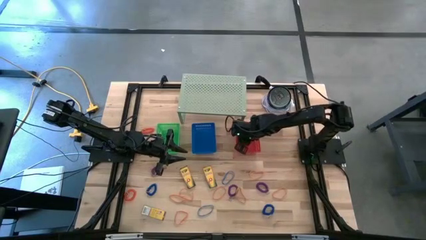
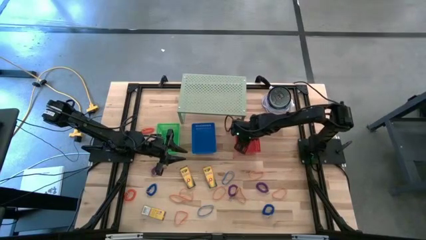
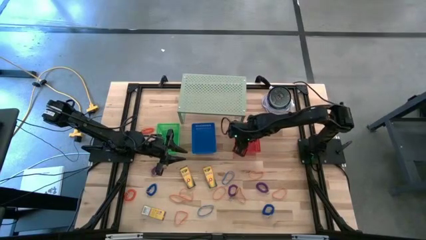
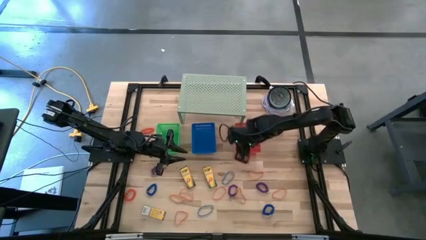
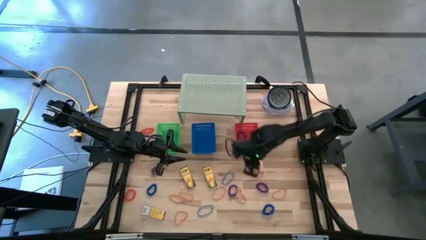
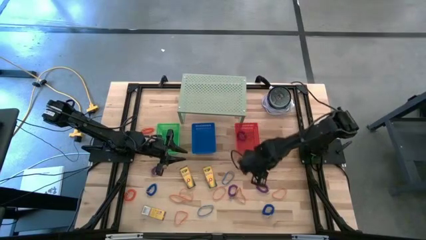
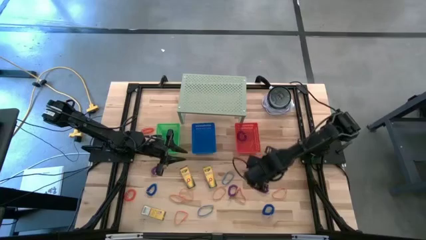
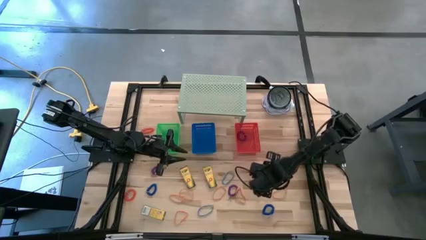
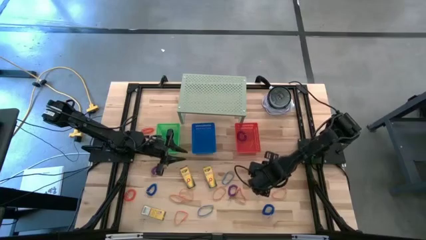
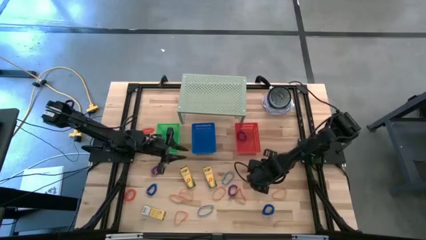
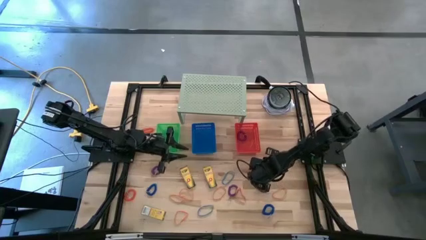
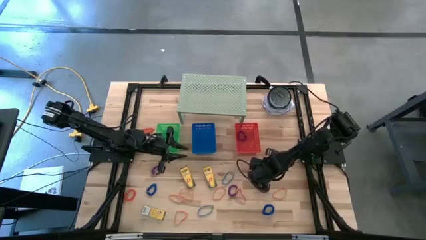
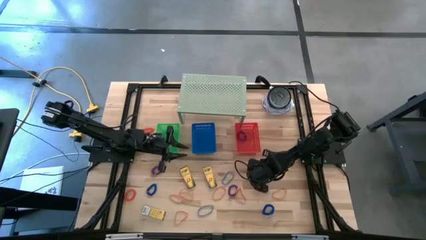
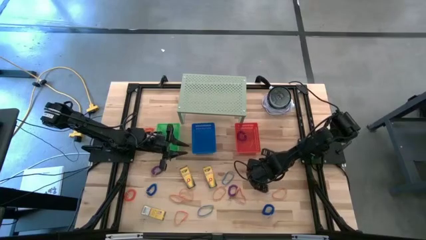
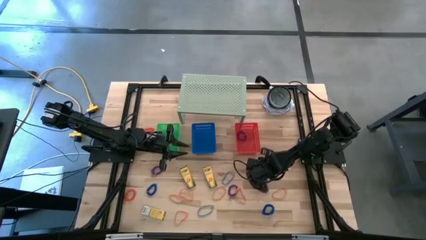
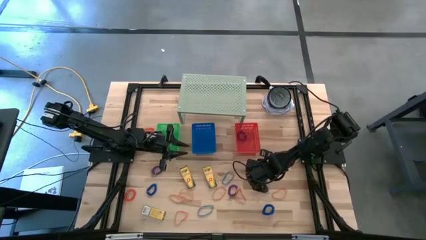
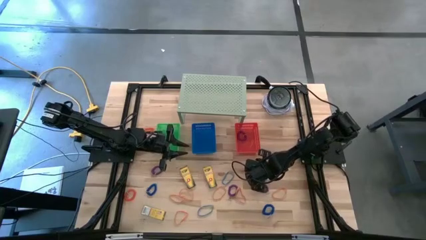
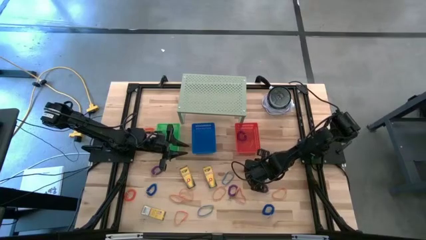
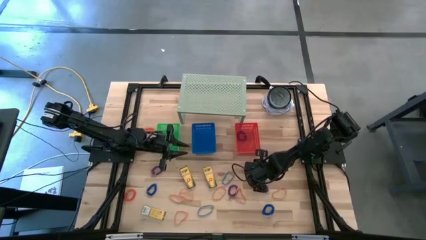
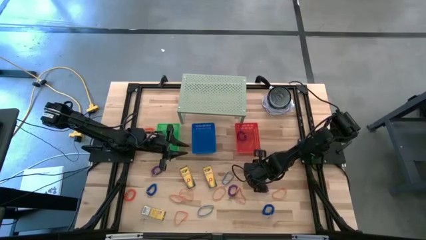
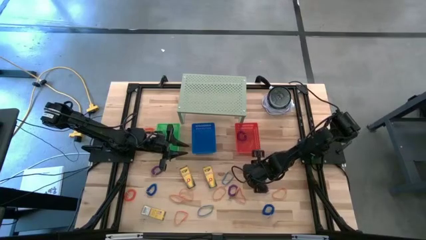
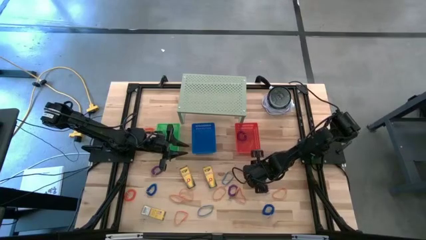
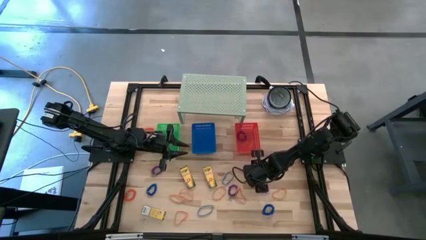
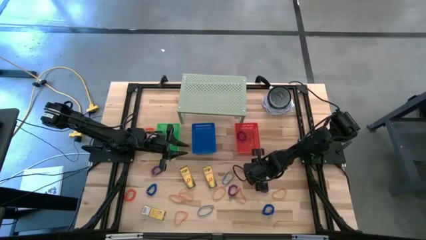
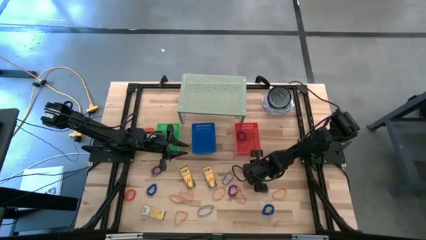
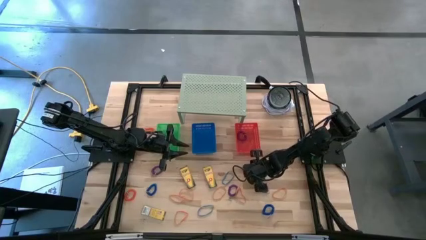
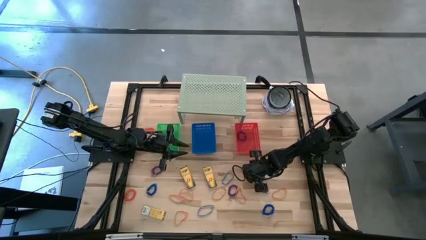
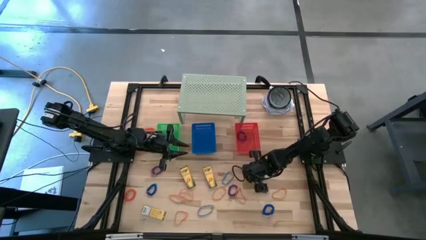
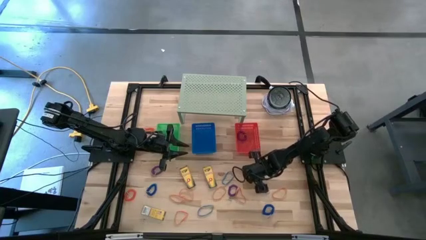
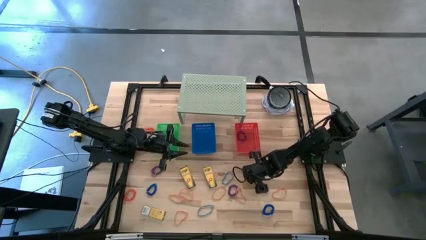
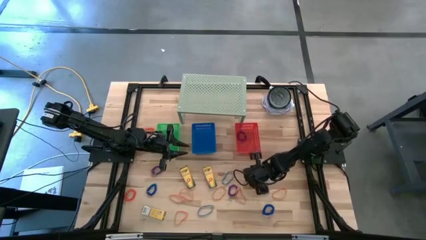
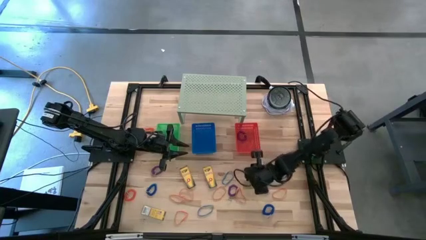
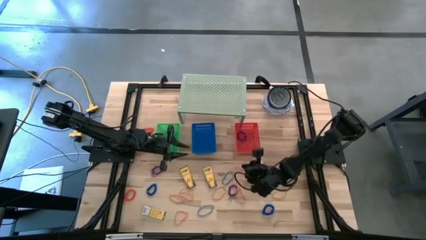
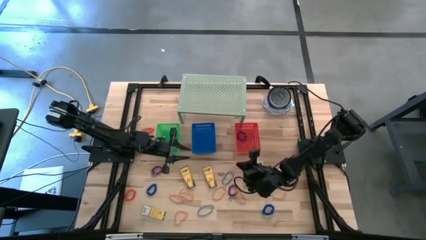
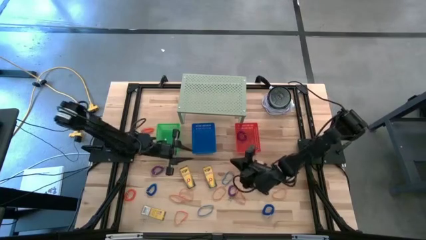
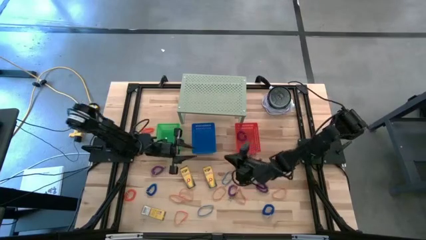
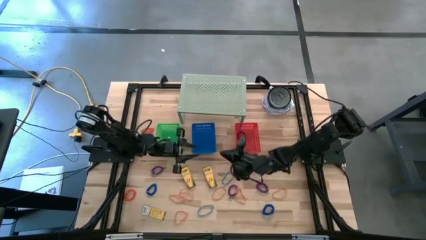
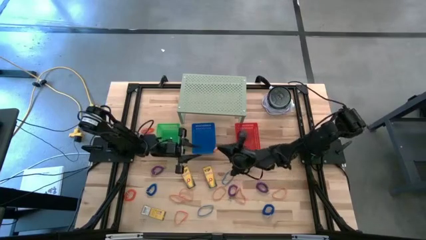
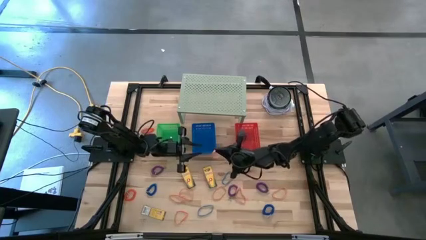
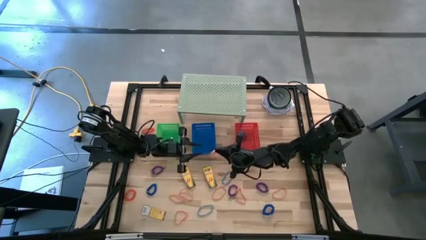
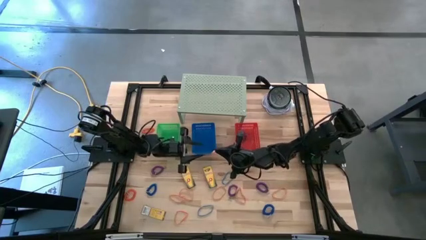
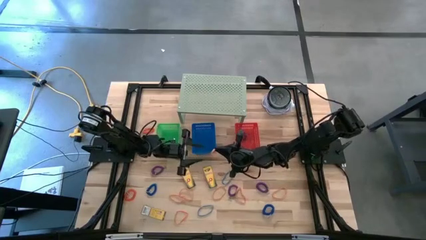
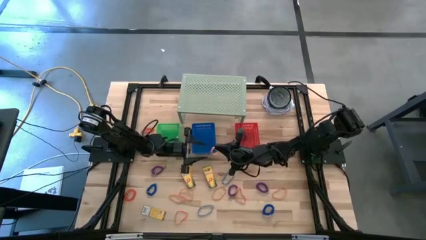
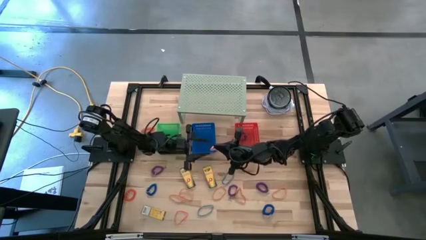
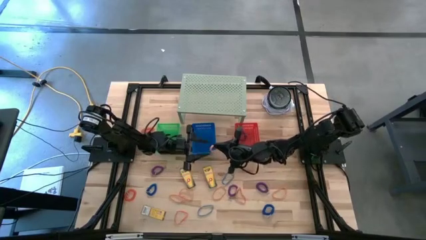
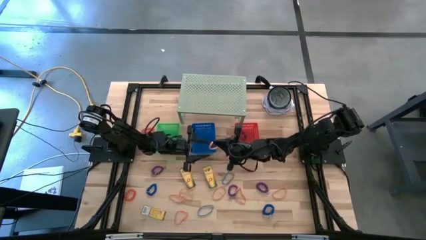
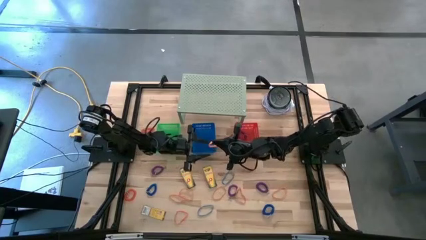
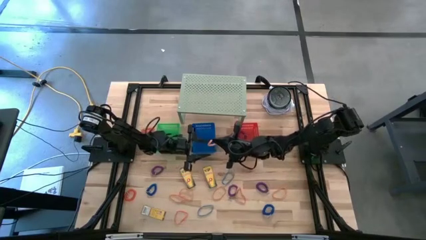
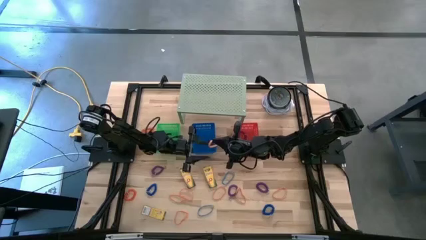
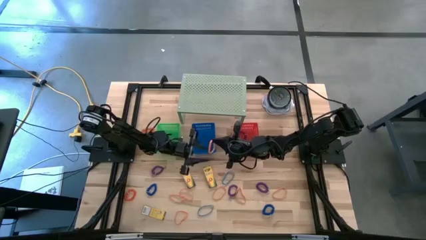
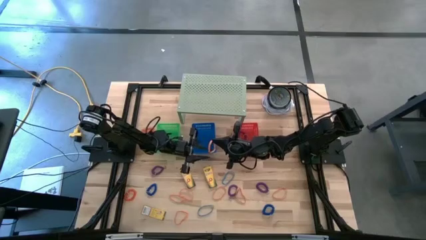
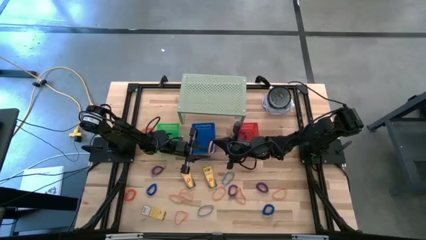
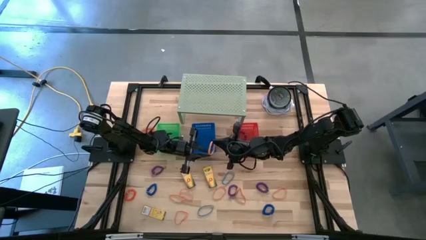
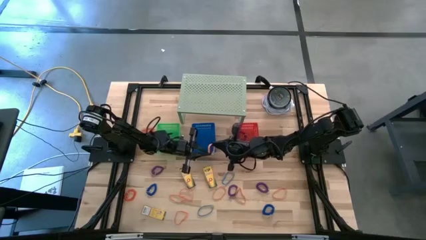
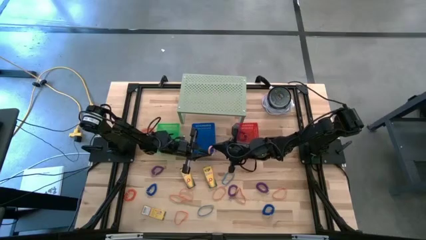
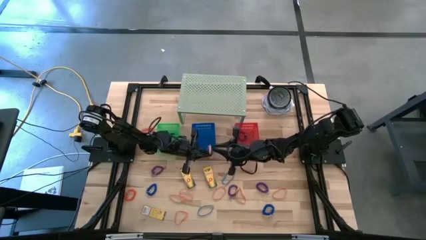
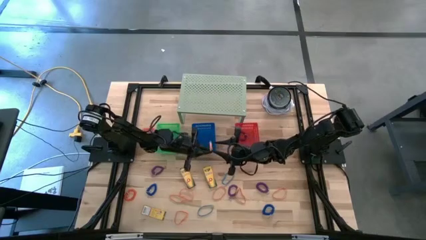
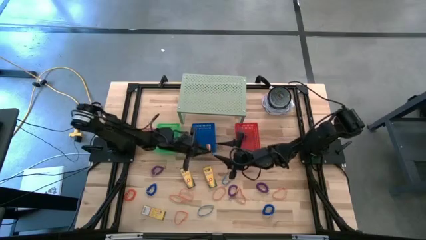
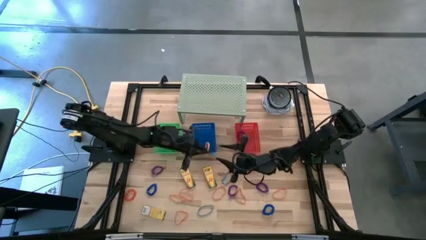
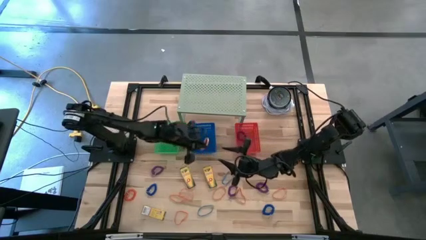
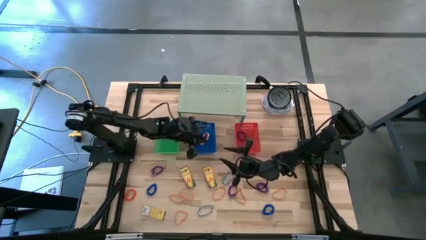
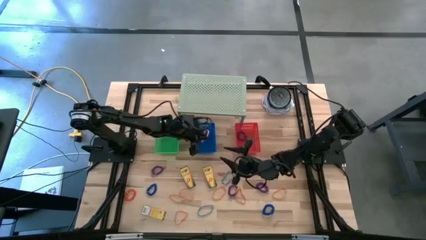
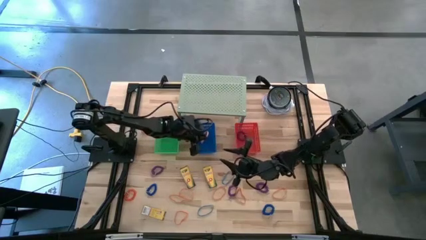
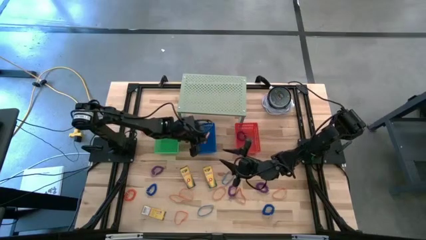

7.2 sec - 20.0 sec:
Task: Pick & Place Office Desk Supplies
Put the orange rubber band into the blue bin

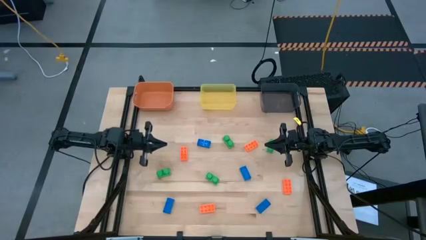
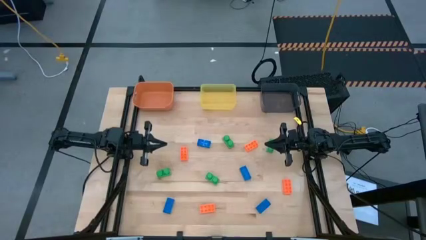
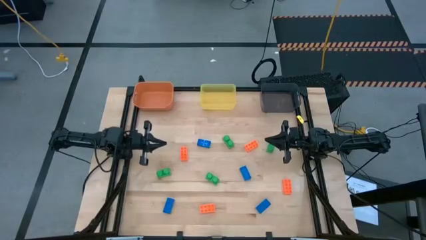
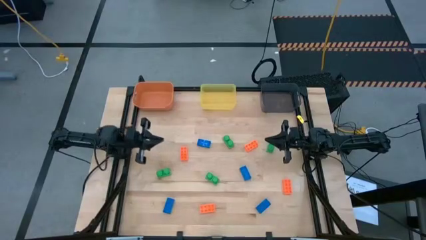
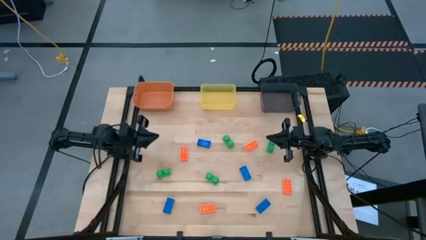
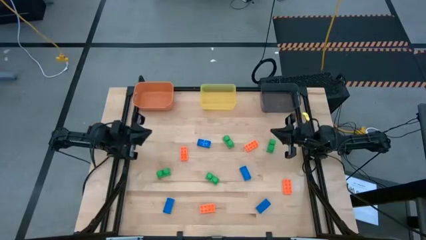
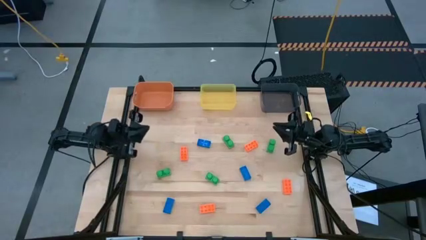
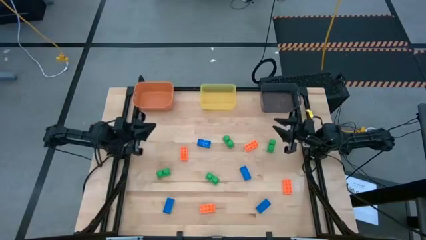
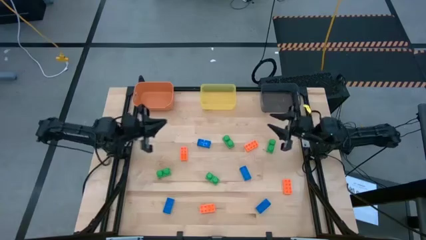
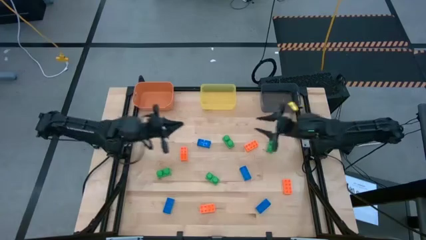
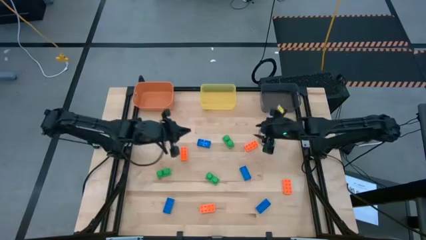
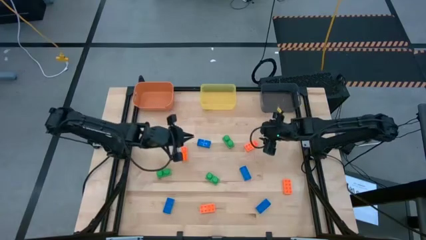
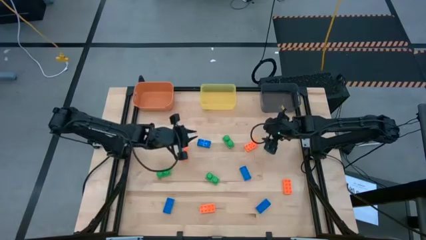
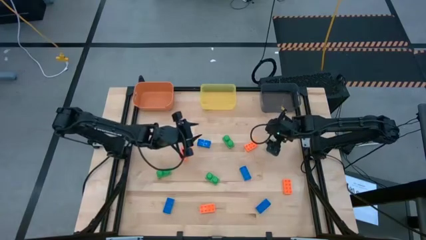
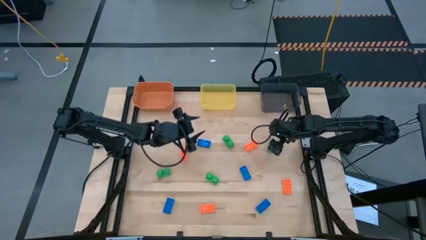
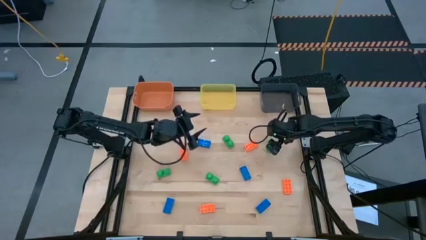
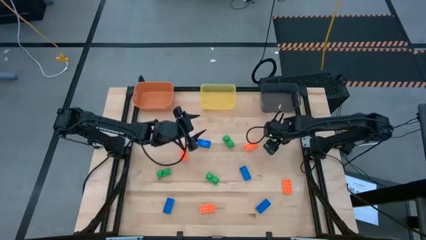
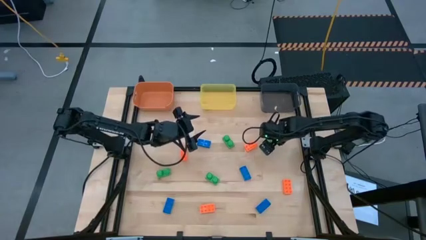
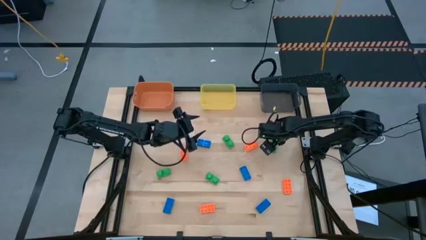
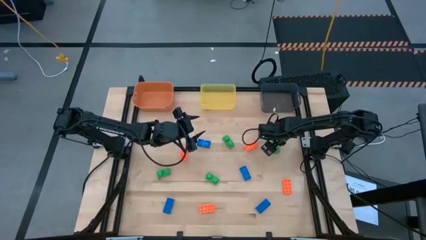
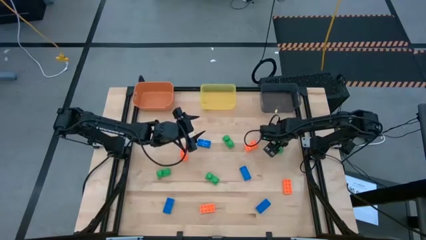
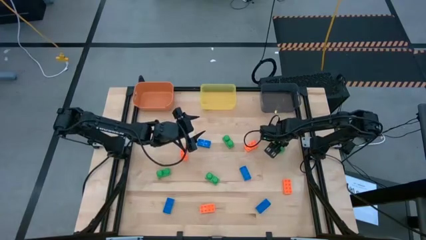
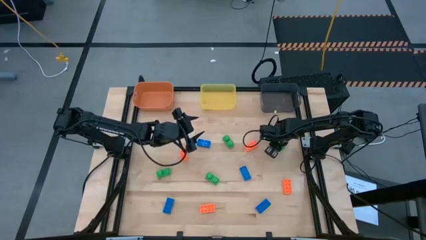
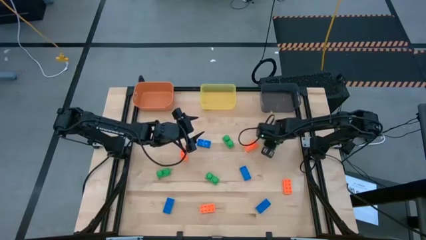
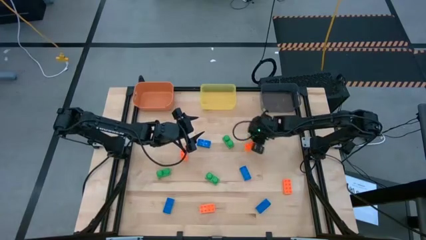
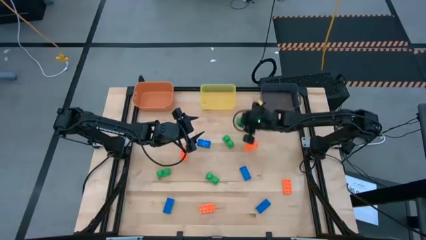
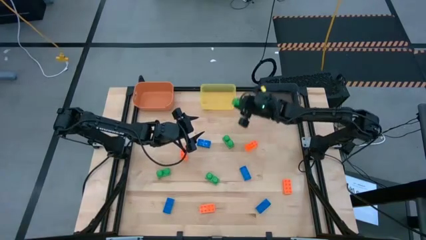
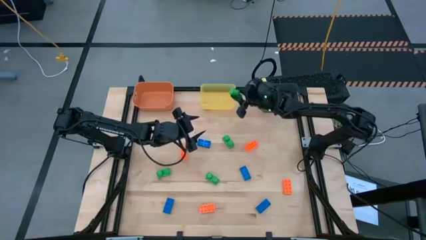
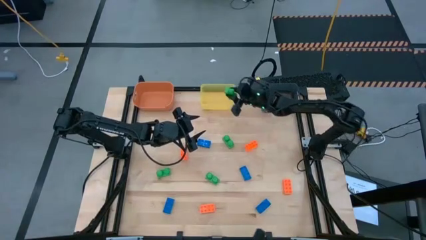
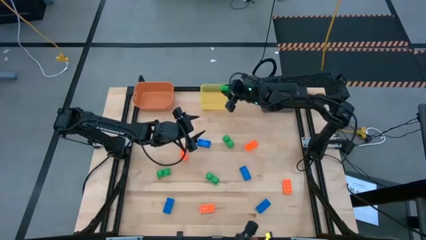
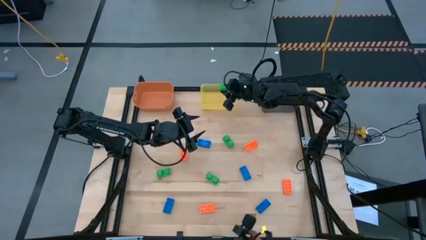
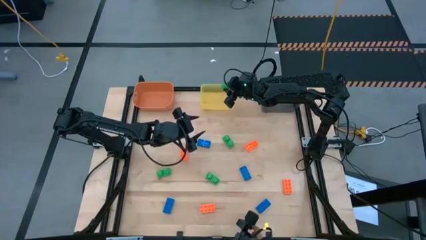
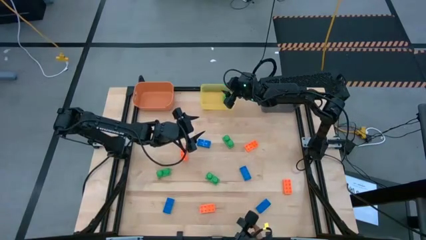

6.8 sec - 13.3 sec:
Task: Sort & place blocks by color
Put the green game piece into the yellow bin
